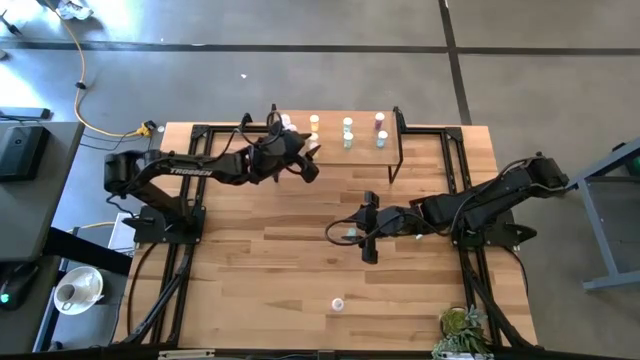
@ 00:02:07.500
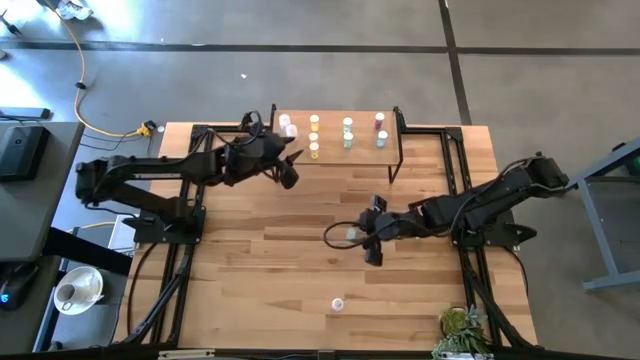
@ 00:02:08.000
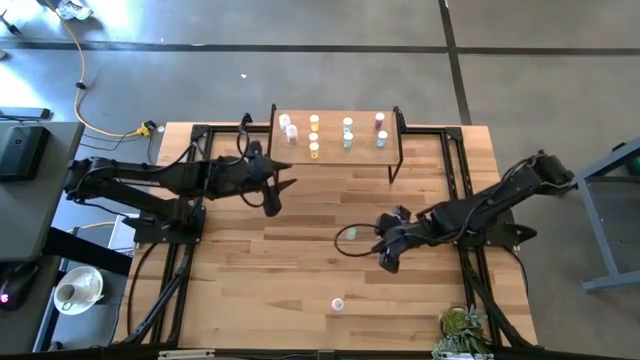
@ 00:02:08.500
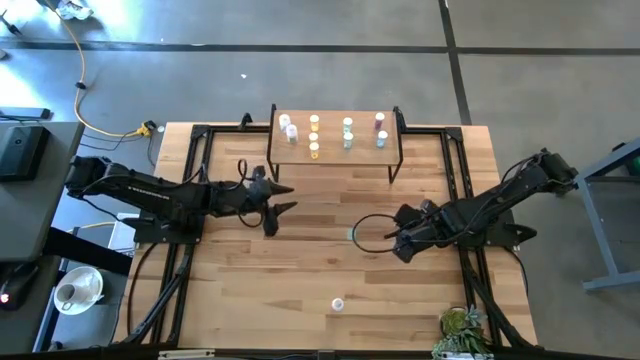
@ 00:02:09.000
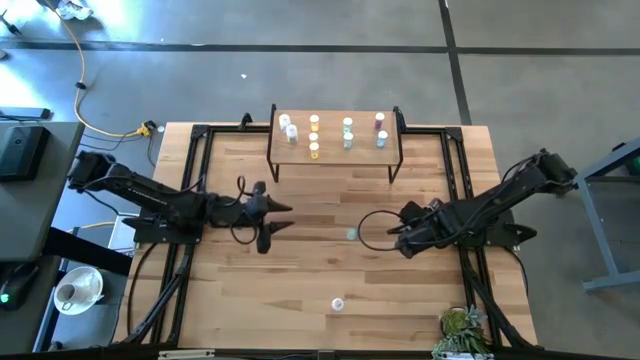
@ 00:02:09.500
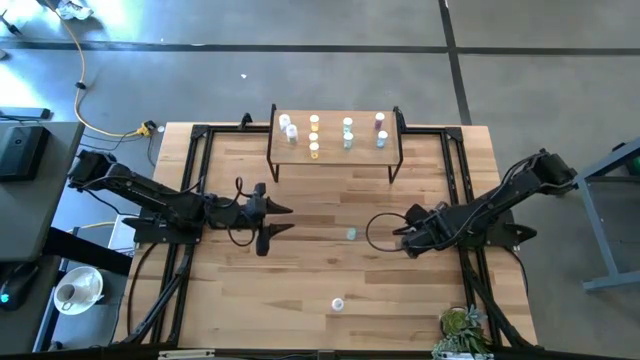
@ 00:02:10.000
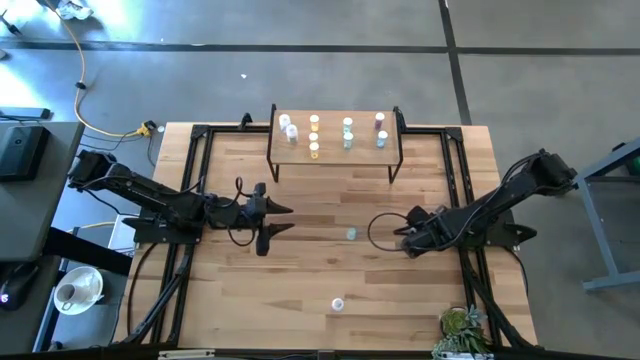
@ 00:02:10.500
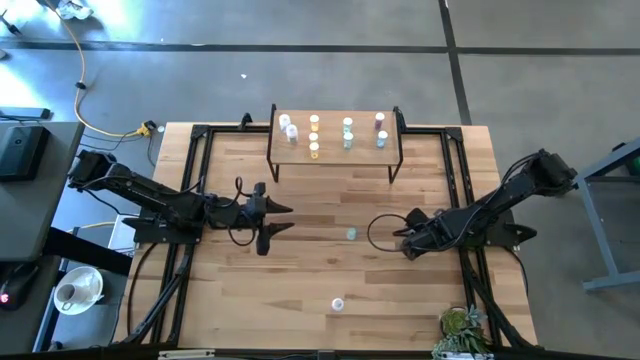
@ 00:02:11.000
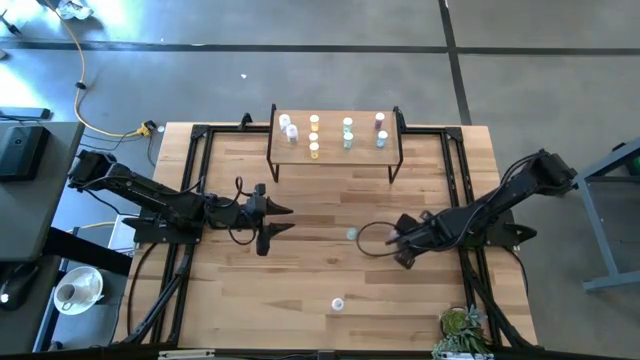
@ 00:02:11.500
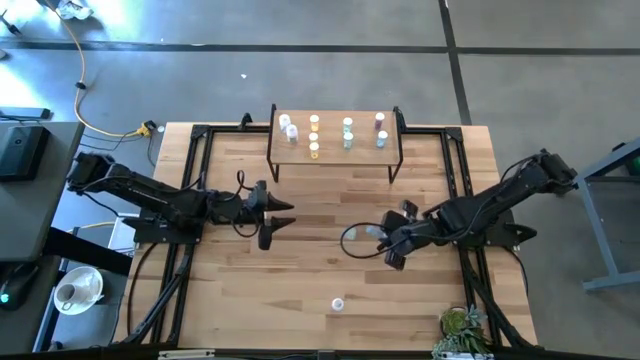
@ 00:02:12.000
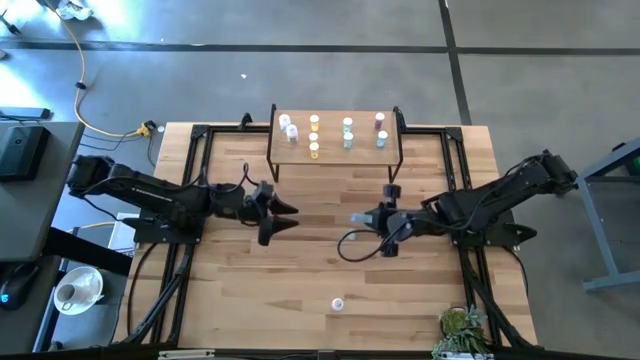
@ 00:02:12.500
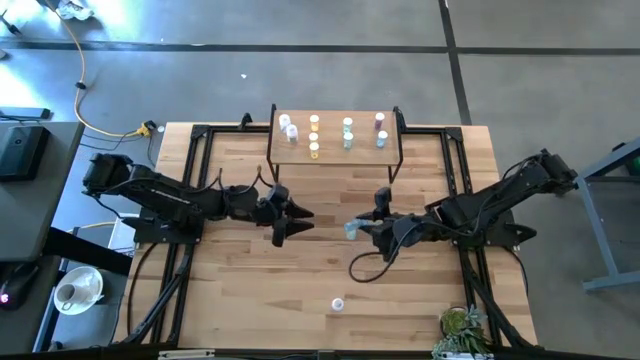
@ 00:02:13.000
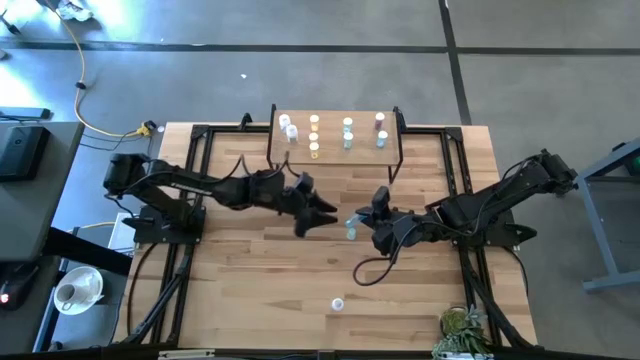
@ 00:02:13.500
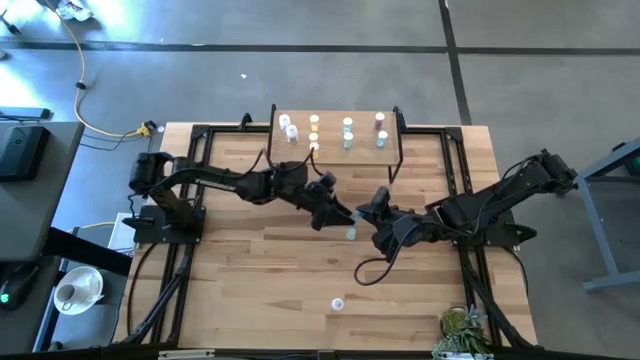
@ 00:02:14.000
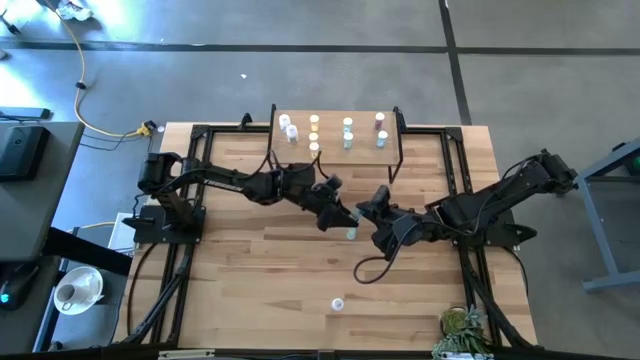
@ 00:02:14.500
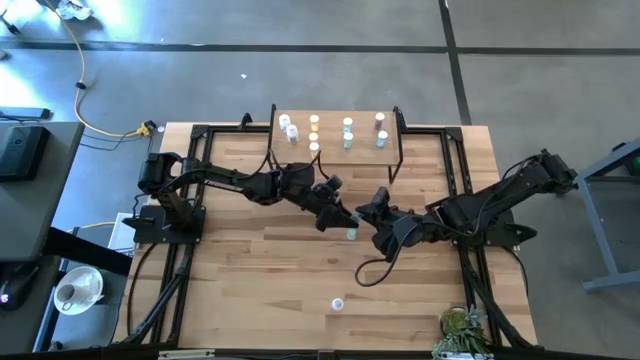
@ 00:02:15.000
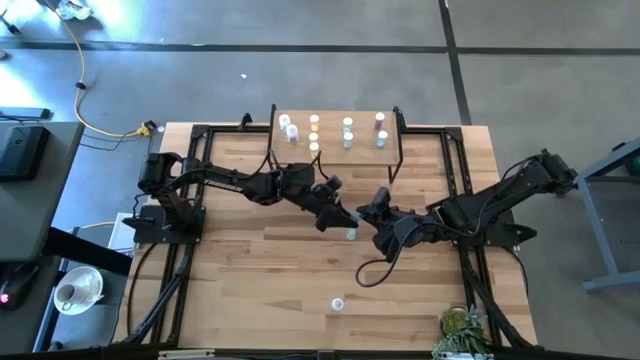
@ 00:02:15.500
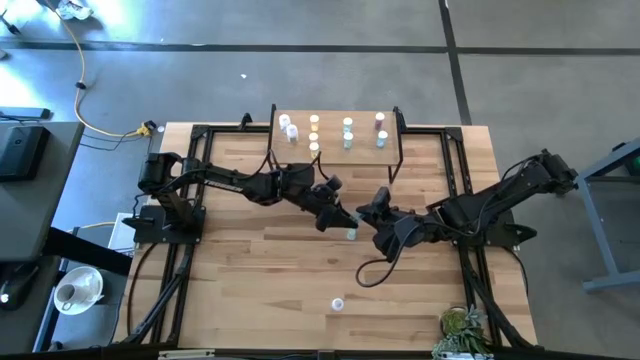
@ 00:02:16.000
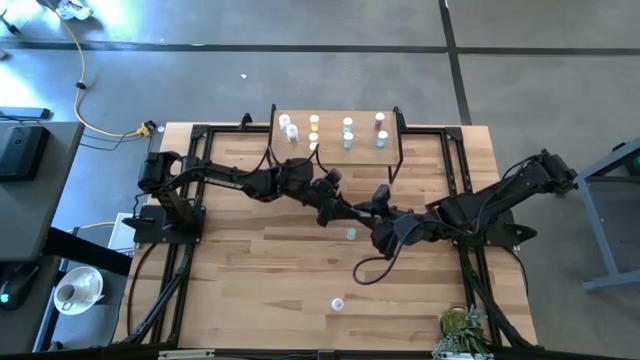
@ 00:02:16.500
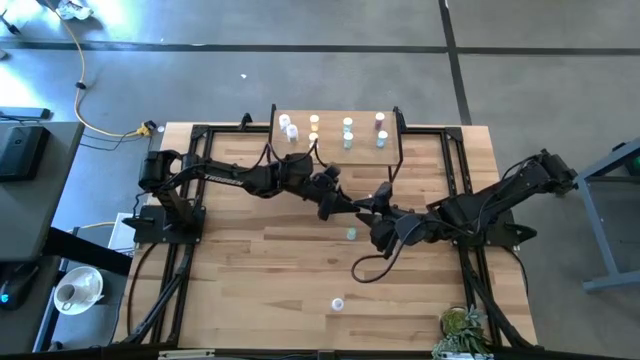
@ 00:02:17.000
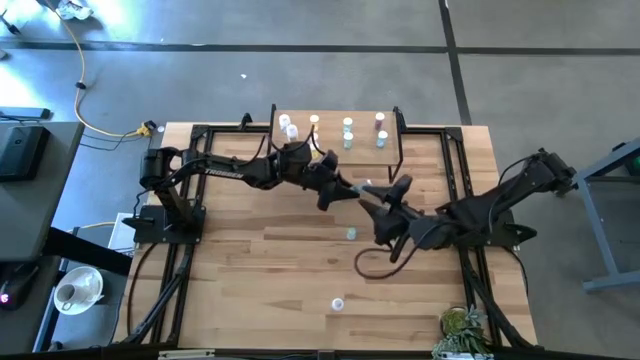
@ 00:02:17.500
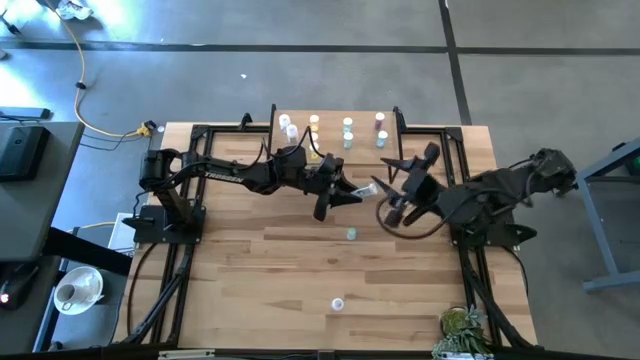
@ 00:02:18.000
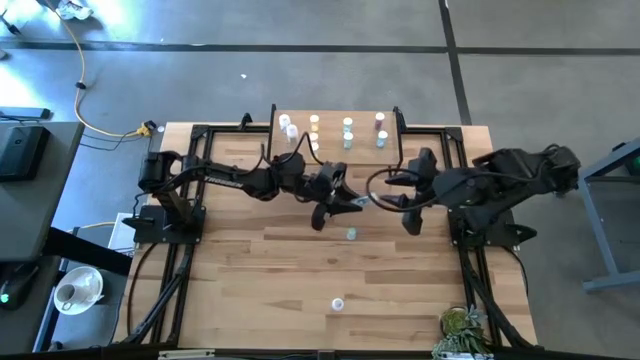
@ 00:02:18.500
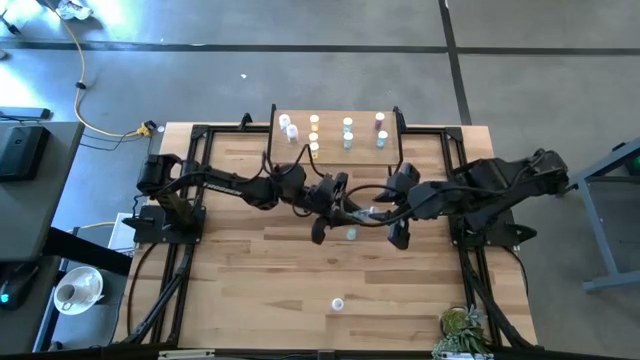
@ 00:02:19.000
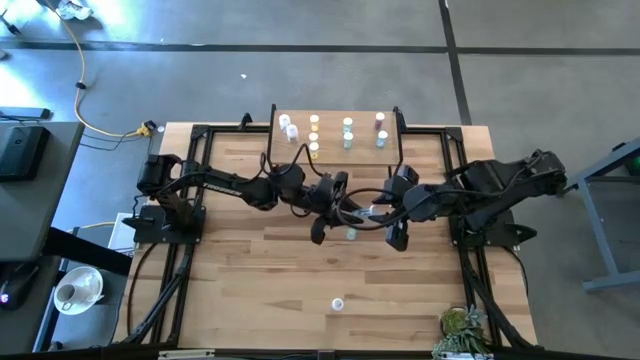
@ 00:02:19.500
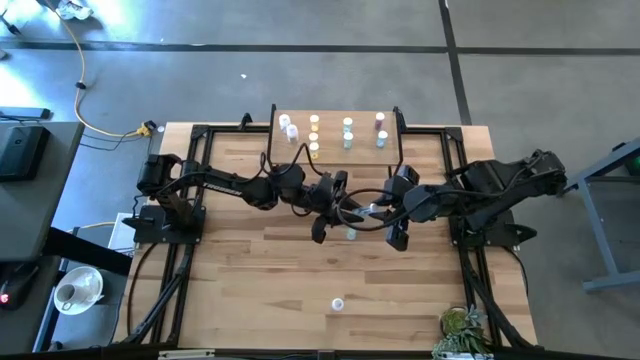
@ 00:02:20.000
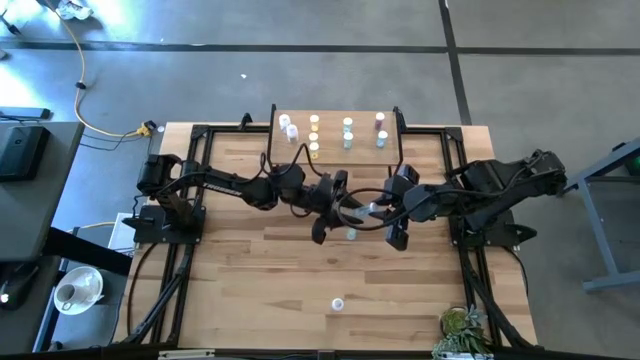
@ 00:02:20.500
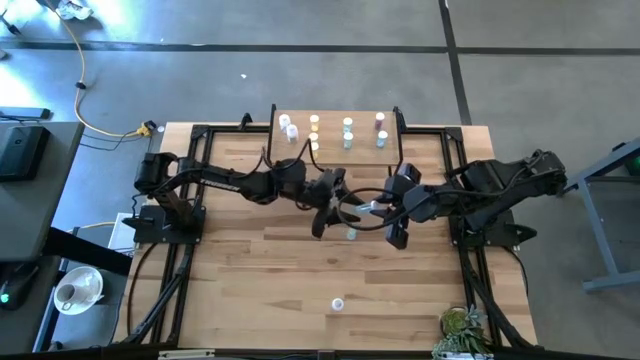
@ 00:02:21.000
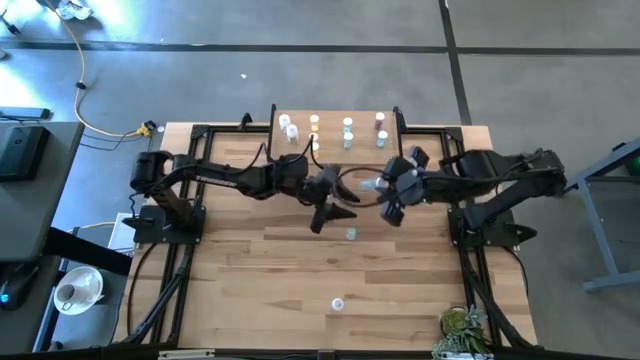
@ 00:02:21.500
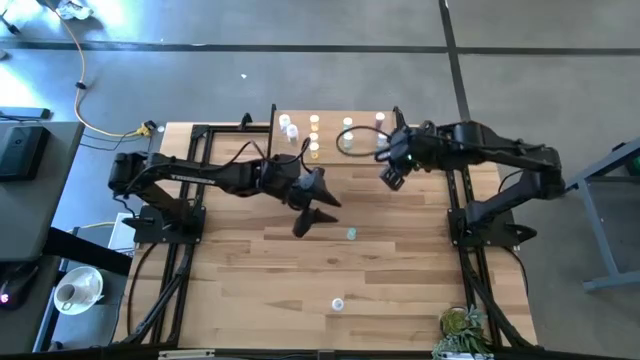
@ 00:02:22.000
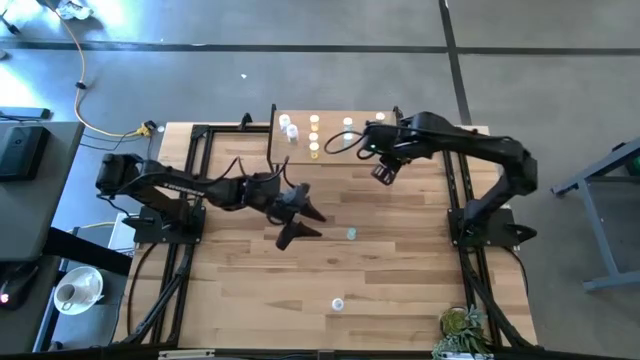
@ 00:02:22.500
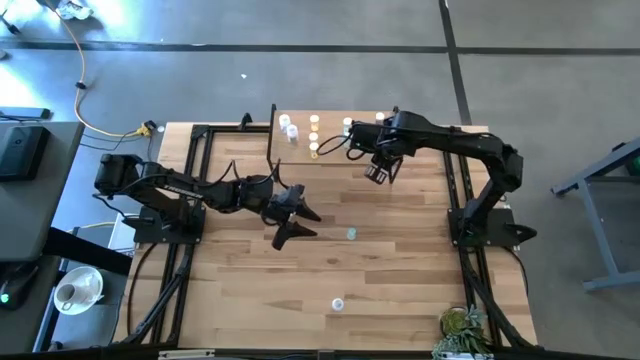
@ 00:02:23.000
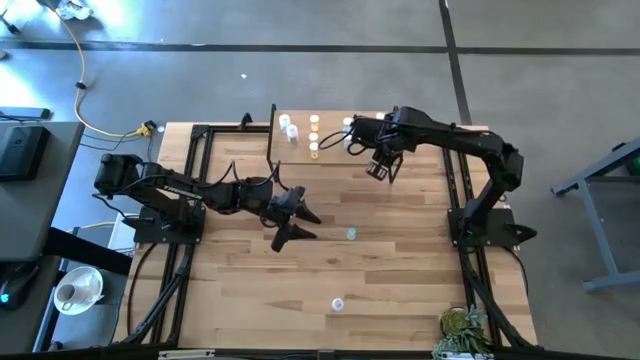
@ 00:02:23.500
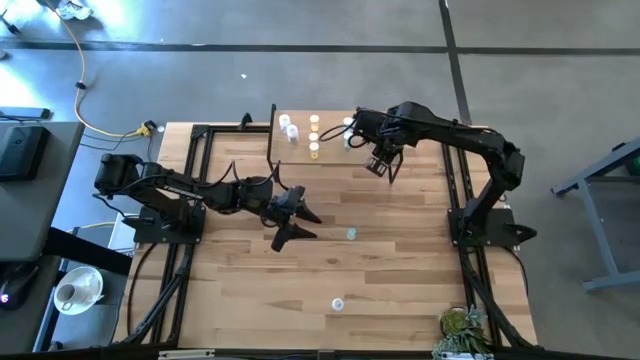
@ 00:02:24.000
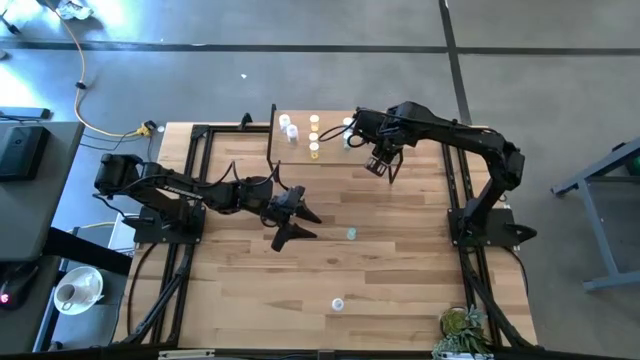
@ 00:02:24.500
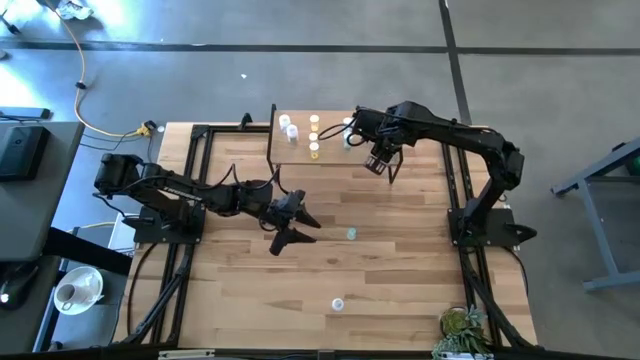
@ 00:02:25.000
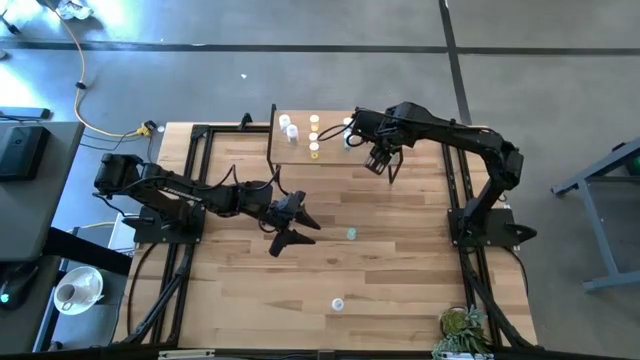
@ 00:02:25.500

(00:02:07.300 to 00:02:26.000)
Task: Pick and place medicine bottles onto shelf by color
Put the blue pill bottle on the shelf aligned with the other blue pill bottles
